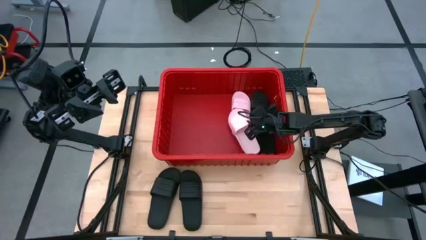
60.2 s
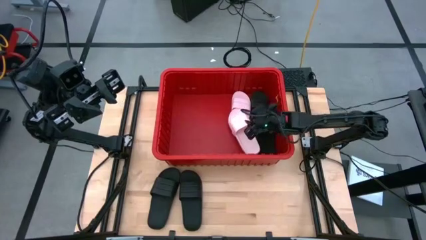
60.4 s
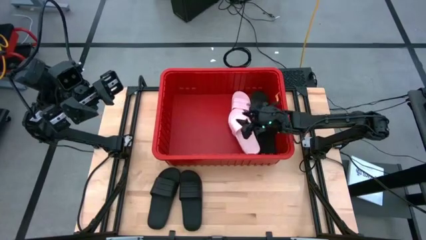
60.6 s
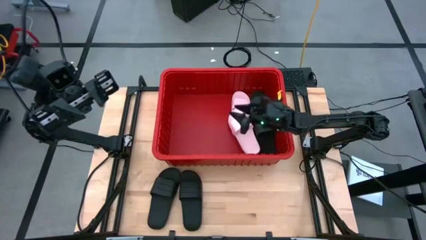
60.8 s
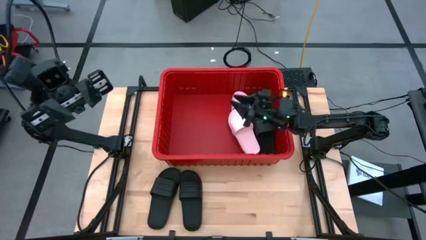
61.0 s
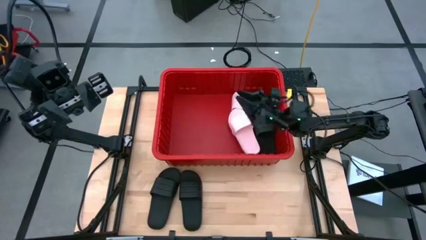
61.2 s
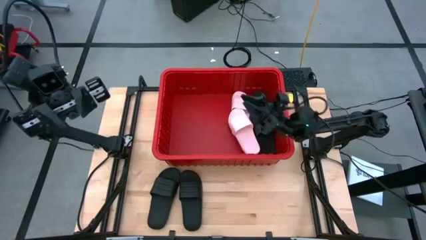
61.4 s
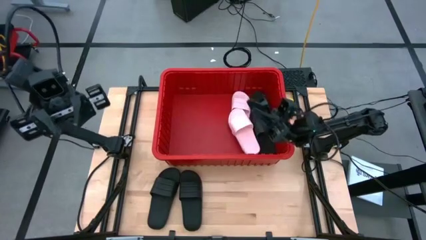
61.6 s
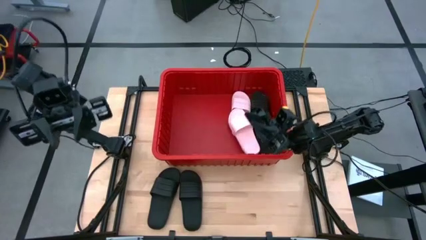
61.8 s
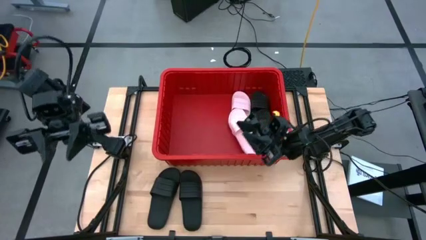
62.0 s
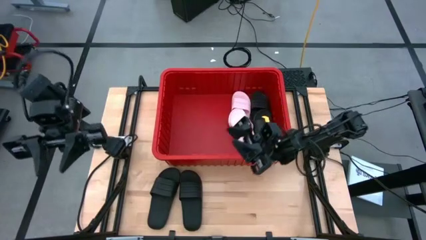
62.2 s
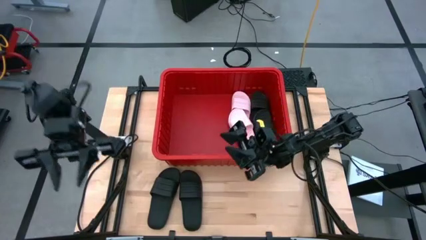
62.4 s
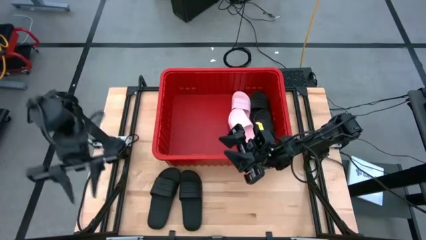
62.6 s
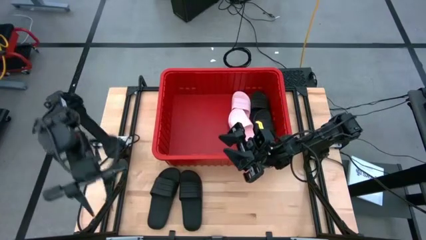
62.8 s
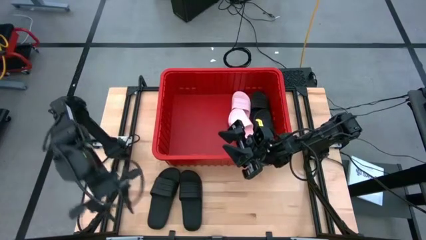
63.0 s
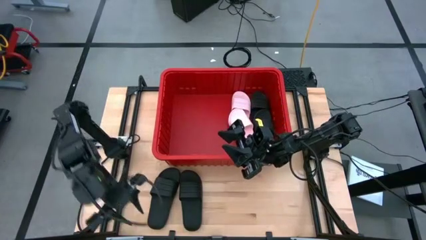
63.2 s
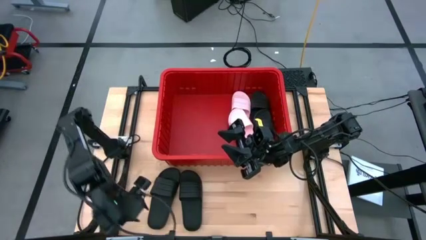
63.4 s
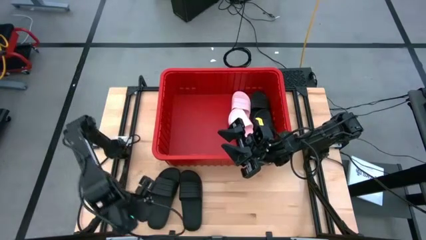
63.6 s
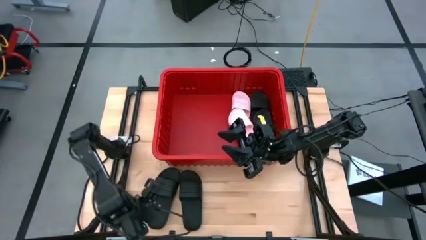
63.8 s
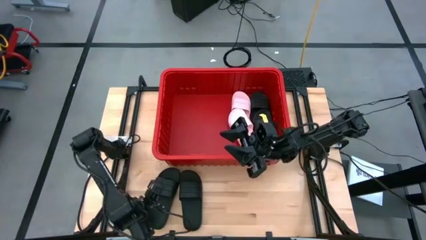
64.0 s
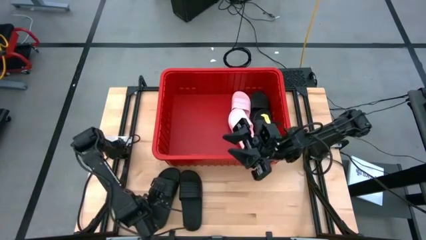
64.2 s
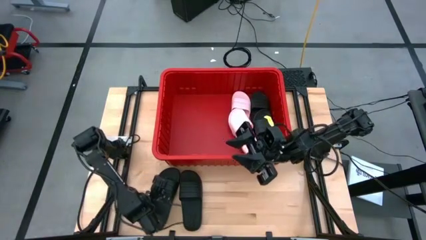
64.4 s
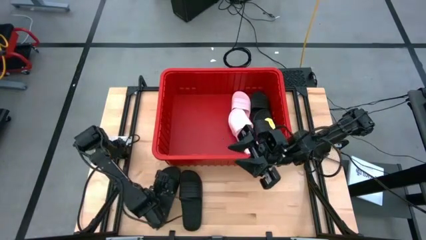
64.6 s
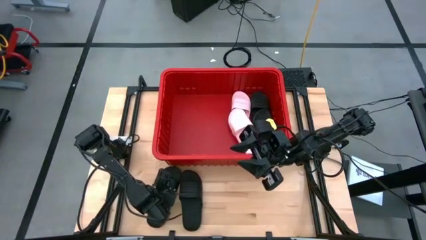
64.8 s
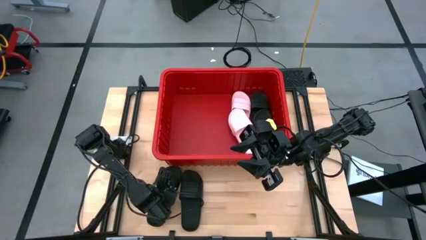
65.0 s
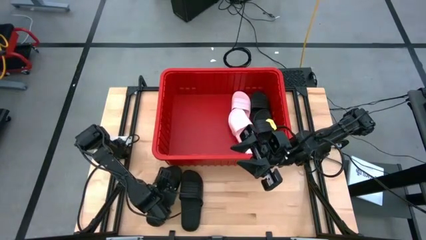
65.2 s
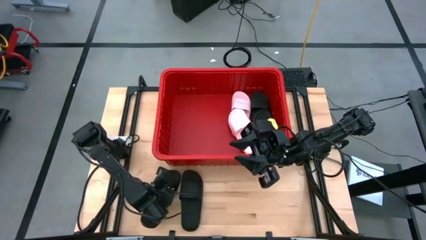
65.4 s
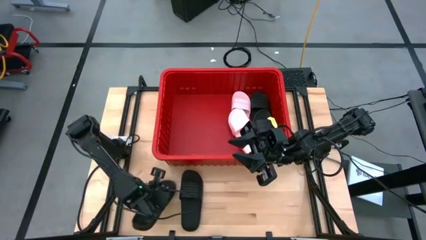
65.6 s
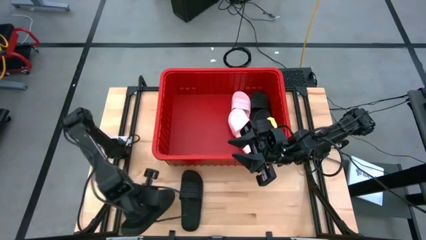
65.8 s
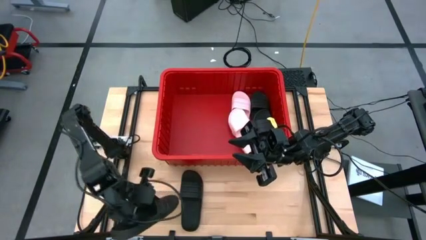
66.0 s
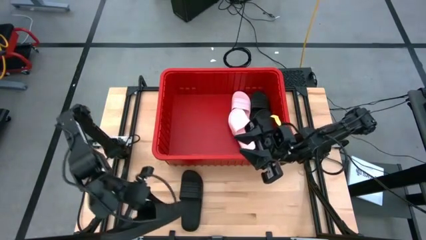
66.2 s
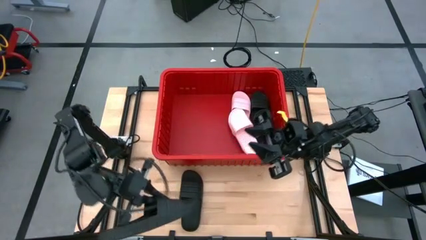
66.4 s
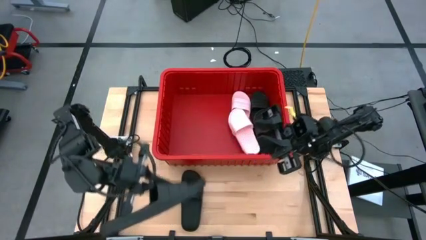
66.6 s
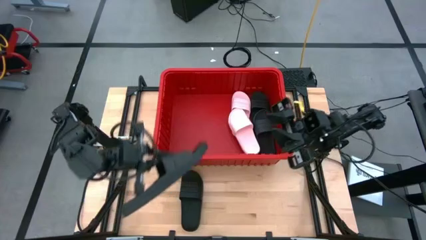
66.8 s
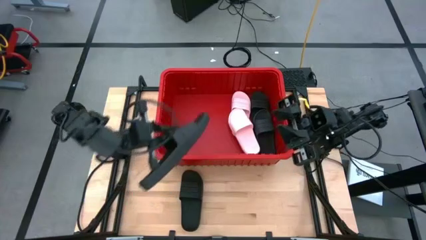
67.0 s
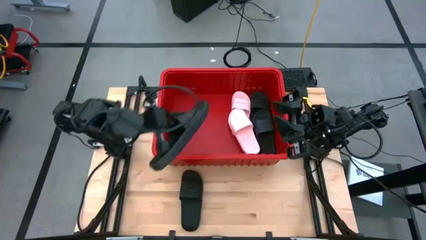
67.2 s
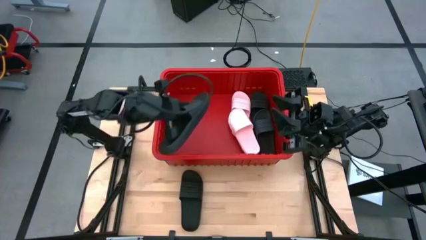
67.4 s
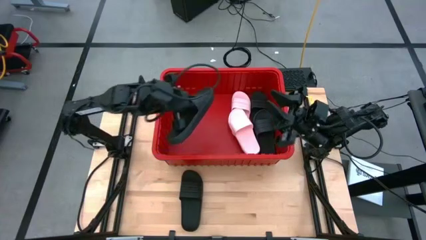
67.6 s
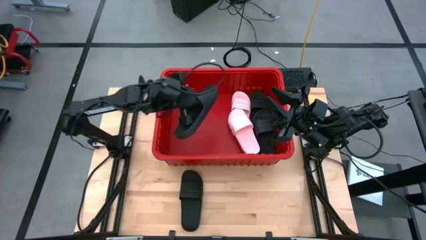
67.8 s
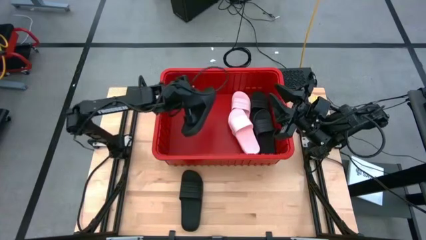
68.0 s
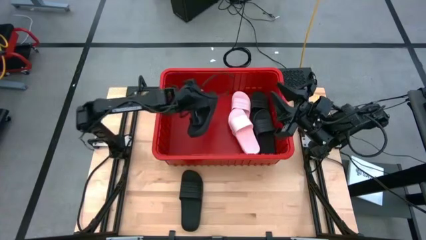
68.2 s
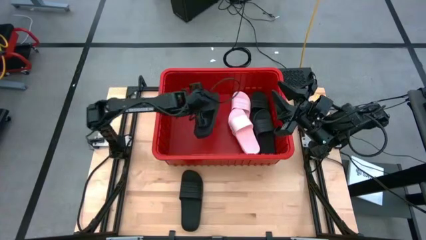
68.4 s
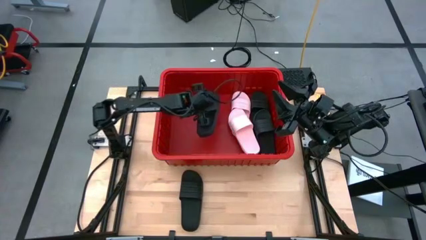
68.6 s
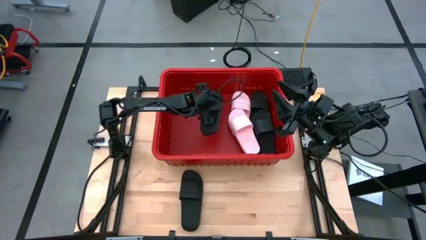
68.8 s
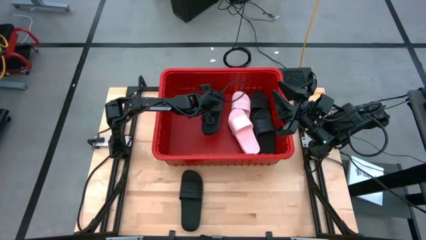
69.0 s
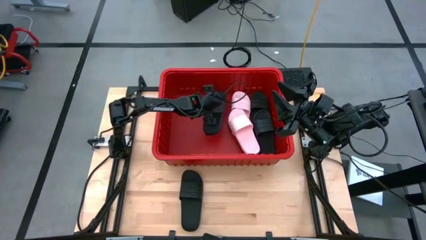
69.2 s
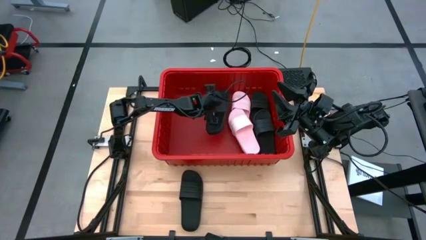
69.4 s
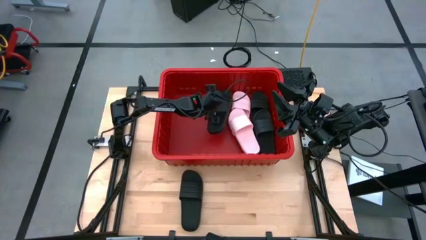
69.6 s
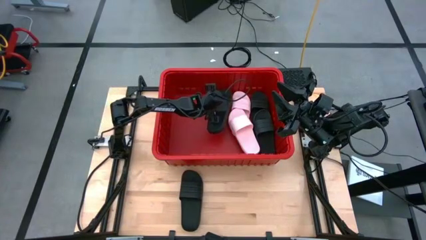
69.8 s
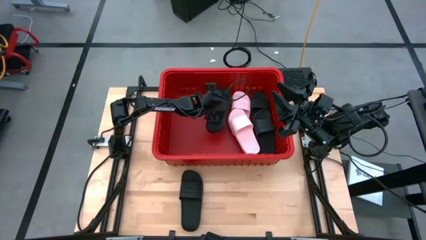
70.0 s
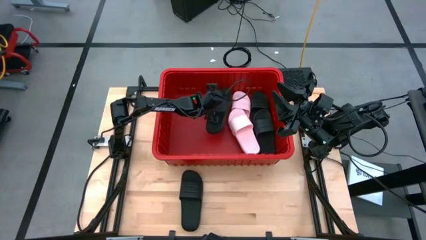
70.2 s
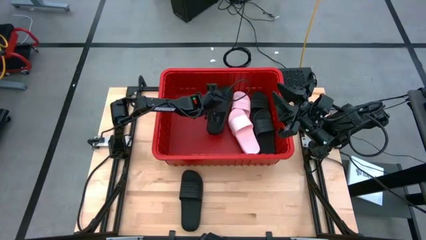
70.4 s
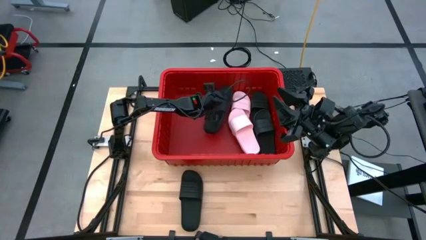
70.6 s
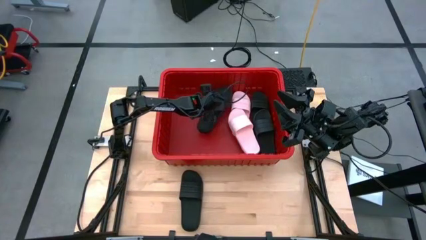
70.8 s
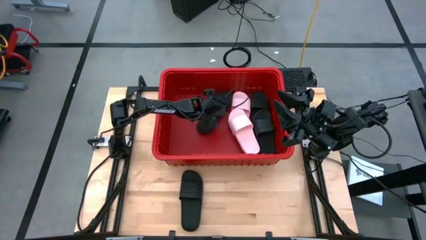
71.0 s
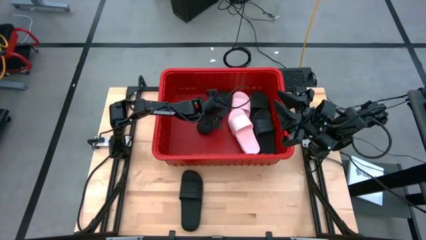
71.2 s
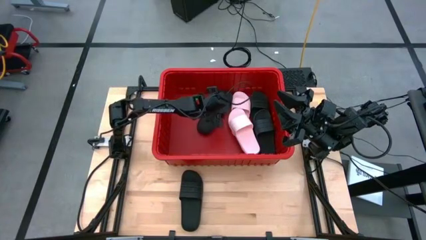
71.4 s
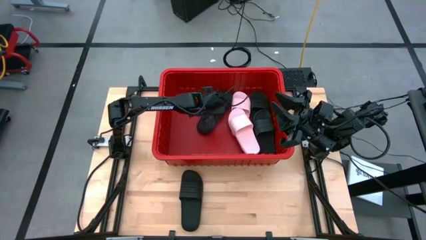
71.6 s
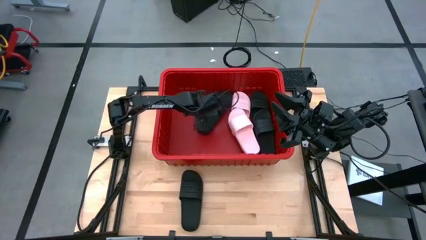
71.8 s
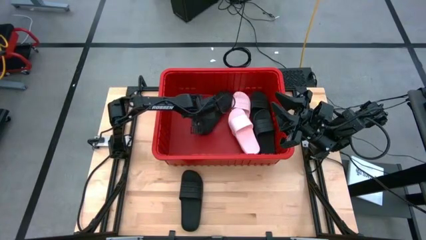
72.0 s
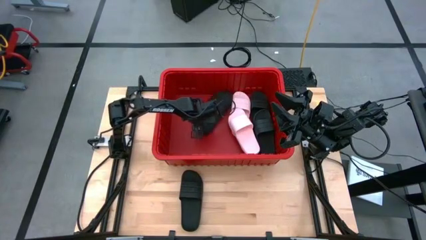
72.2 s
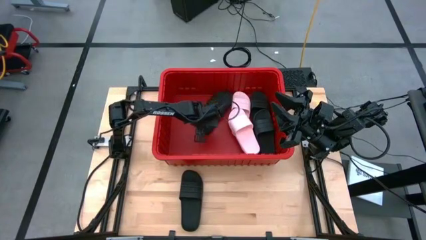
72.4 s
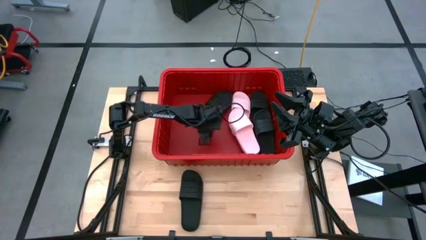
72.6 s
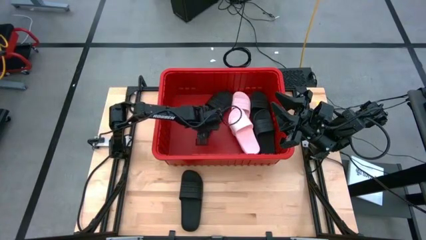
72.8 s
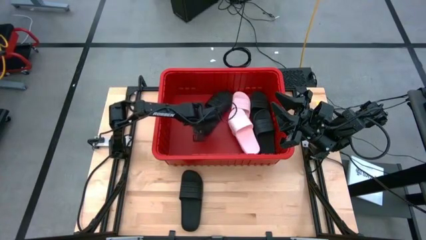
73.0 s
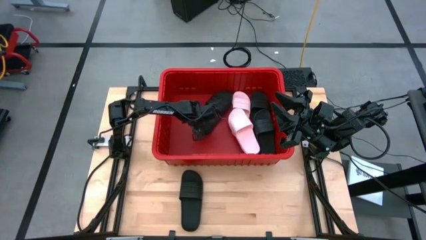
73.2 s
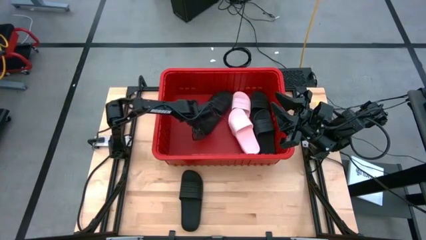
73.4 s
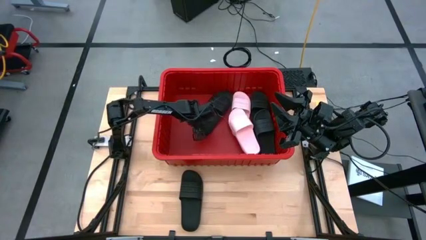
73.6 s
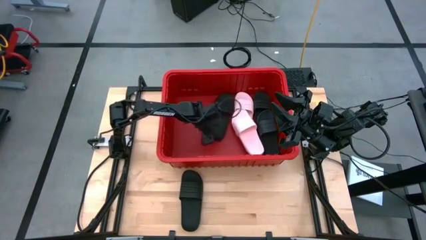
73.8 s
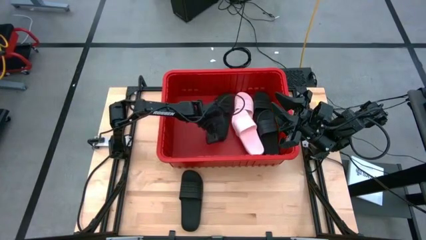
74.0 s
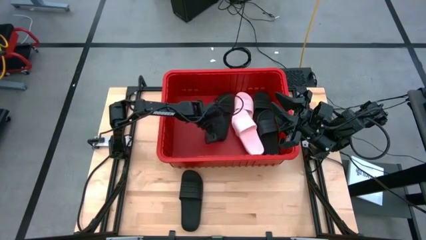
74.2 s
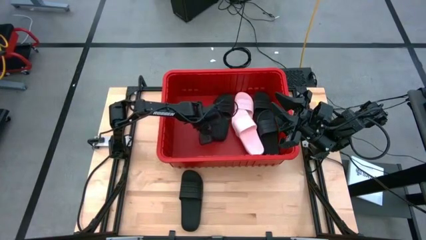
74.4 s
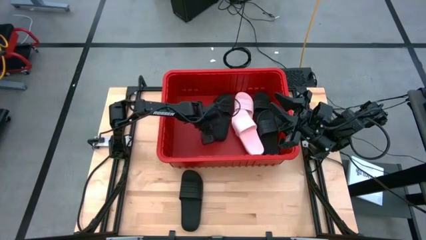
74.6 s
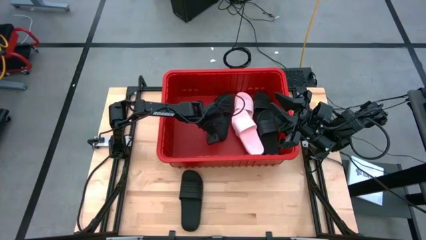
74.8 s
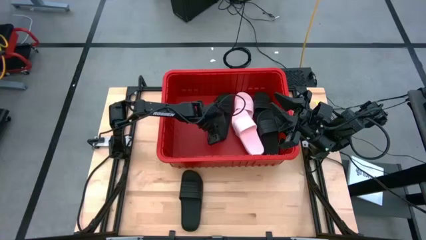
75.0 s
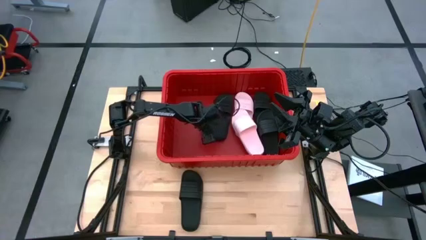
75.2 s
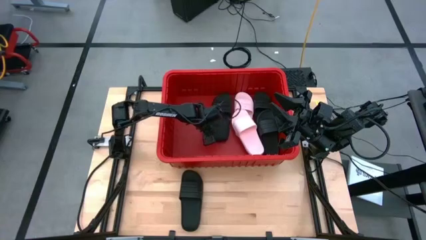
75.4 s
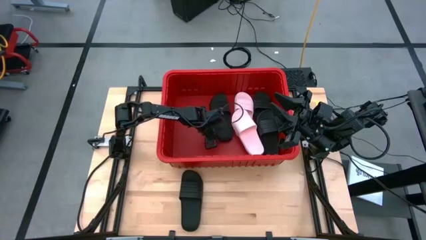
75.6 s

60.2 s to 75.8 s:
Task: Pick and place slides into bin
Put the left black slide into the red bin
